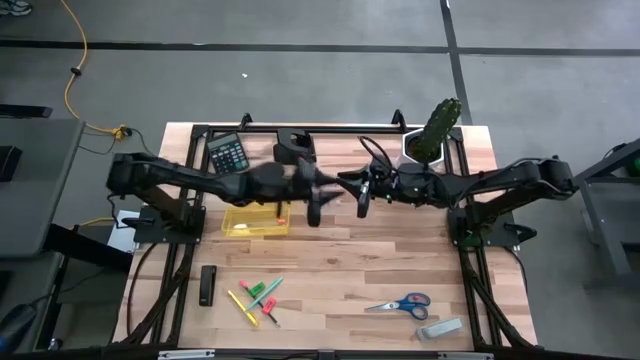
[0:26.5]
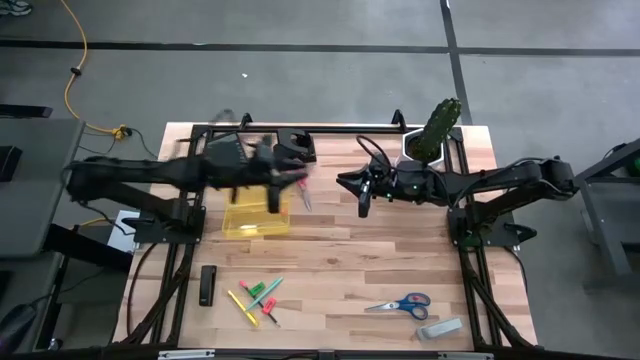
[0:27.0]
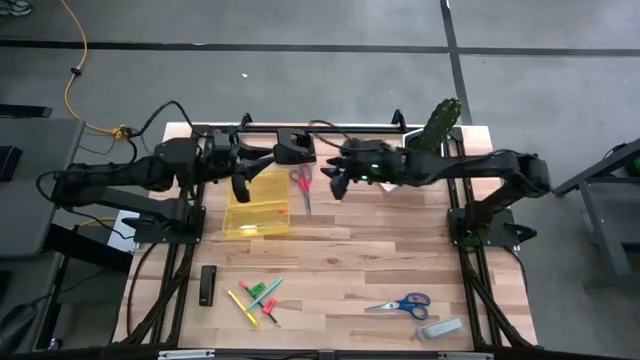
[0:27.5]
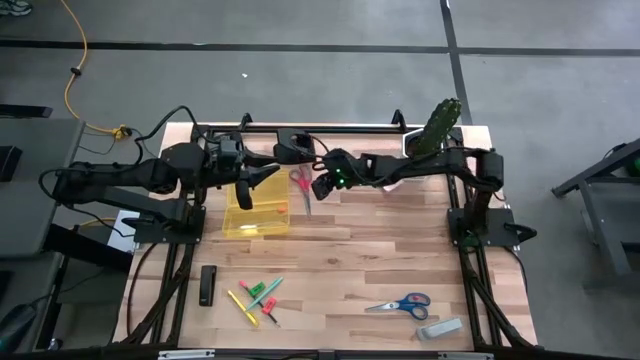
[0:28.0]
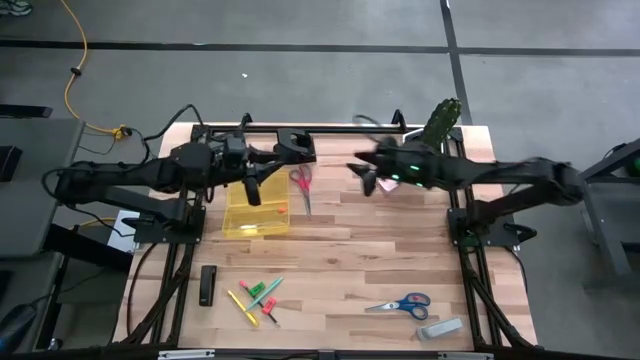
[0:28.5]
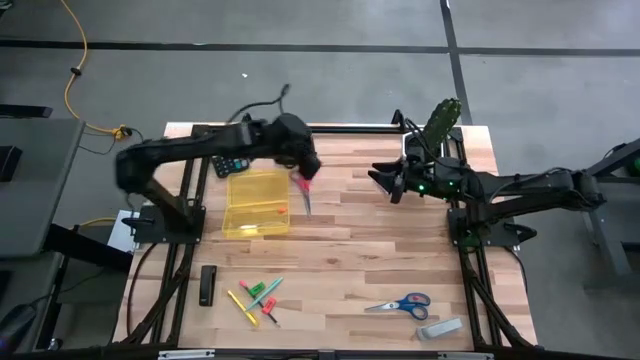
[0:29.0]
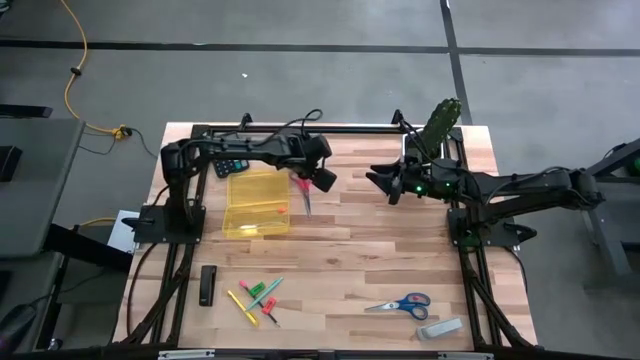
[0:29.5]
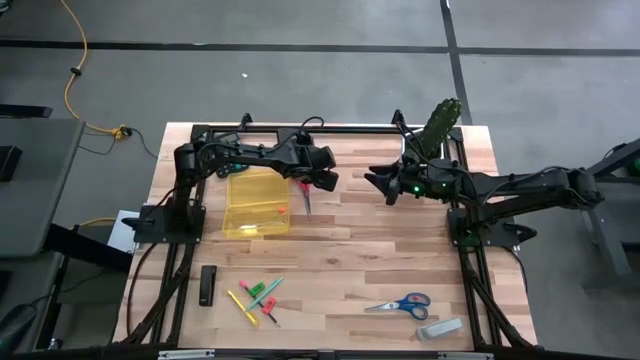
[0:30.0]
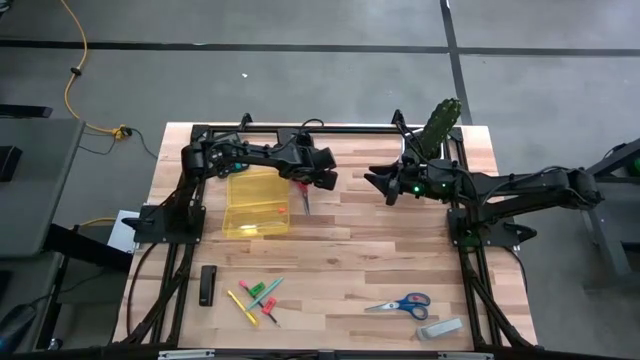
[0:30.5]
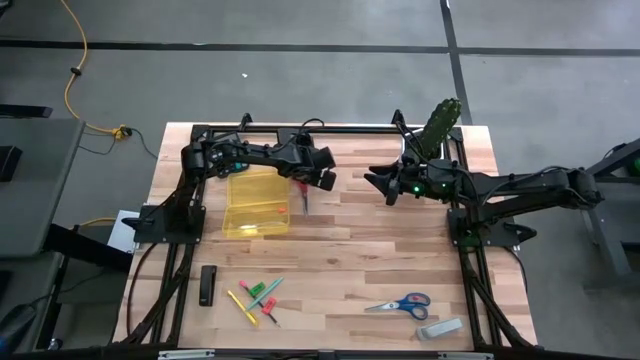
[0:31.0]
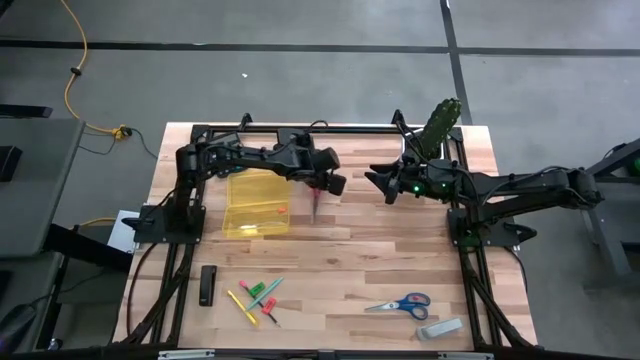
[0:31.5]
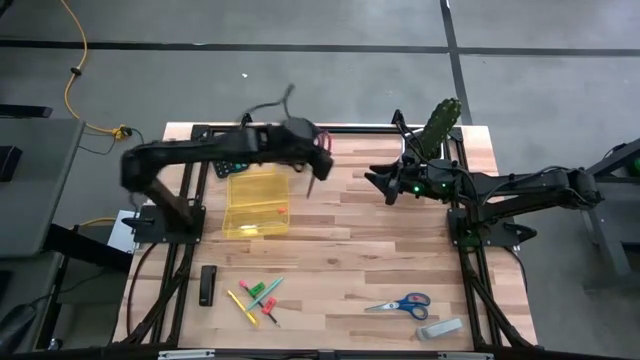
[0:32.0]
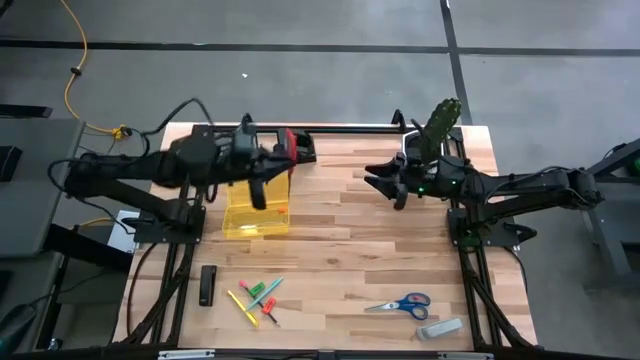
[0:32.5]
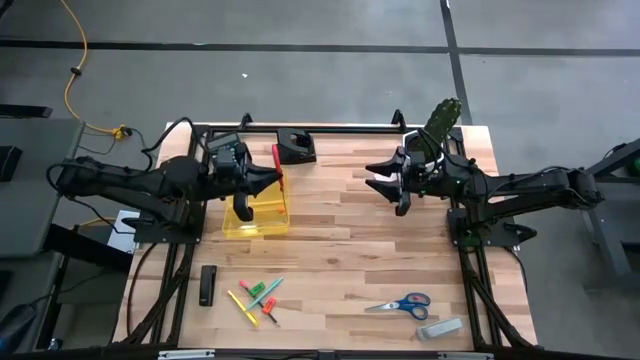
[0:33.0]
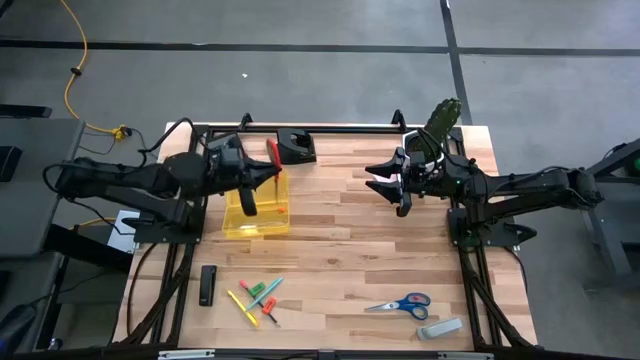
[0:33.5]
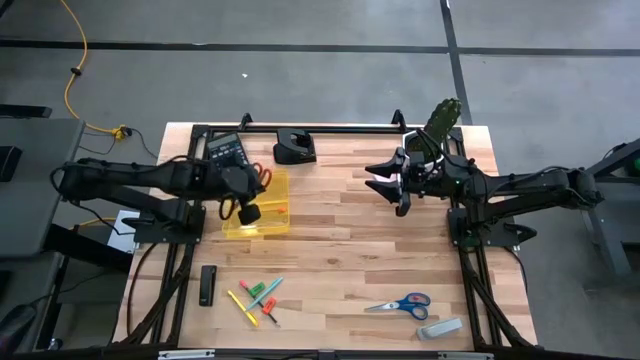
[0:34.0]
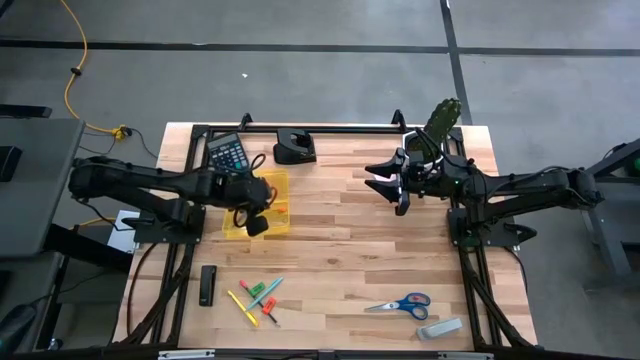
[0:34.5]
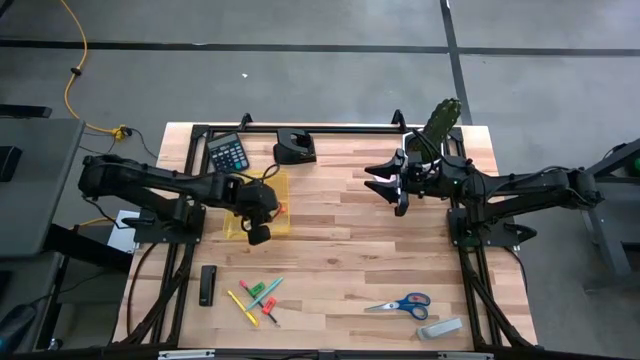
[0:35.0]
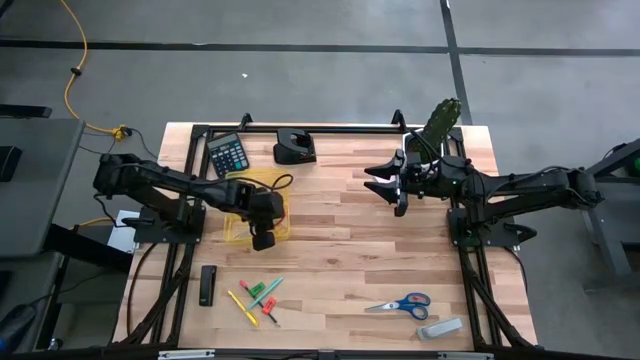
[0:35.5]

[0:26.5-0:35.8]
Task: Pack school essentials
Put the red scissors into the yellow supply box

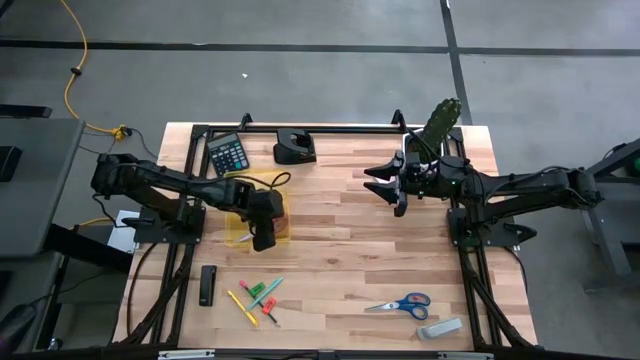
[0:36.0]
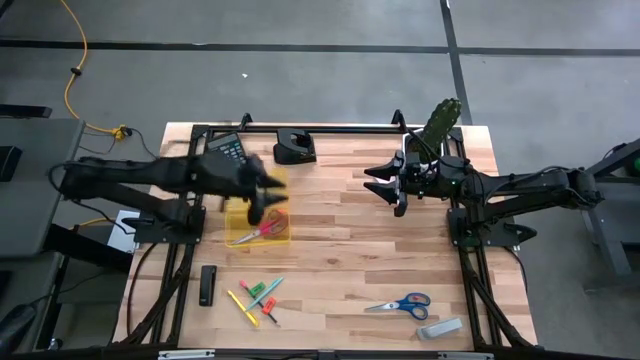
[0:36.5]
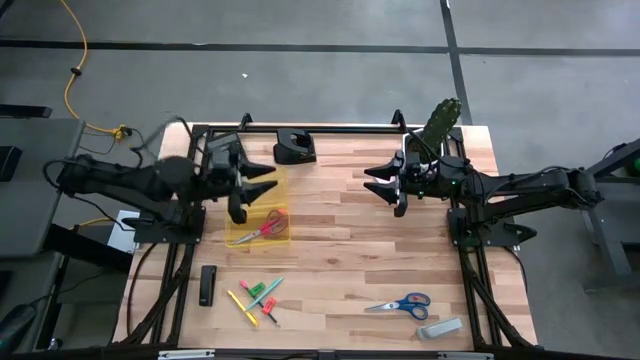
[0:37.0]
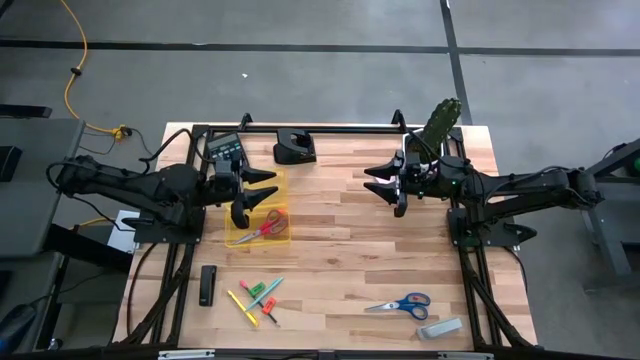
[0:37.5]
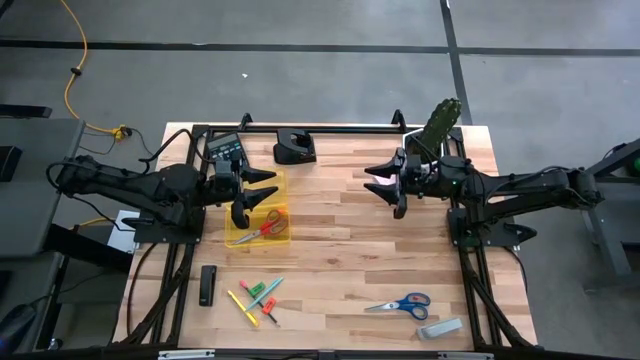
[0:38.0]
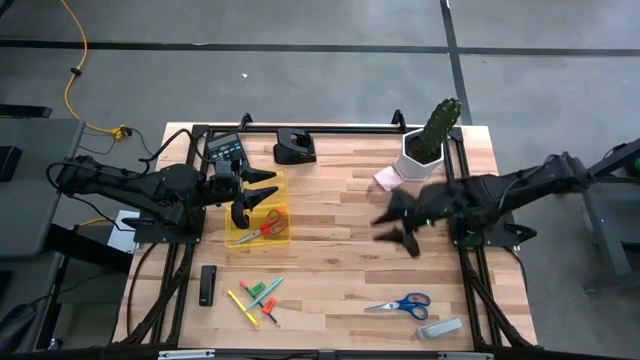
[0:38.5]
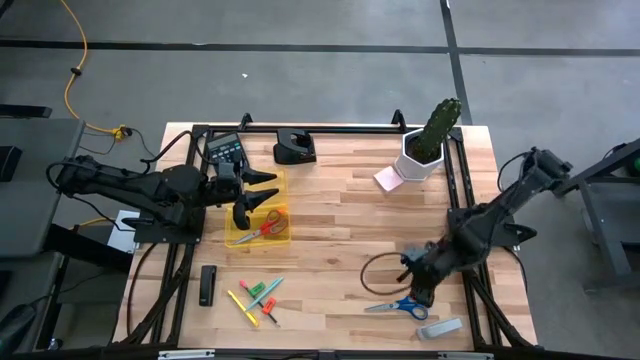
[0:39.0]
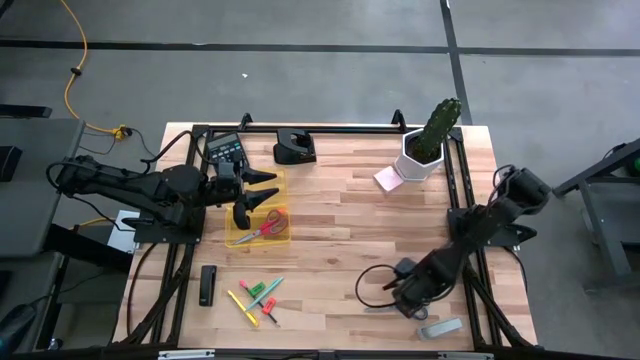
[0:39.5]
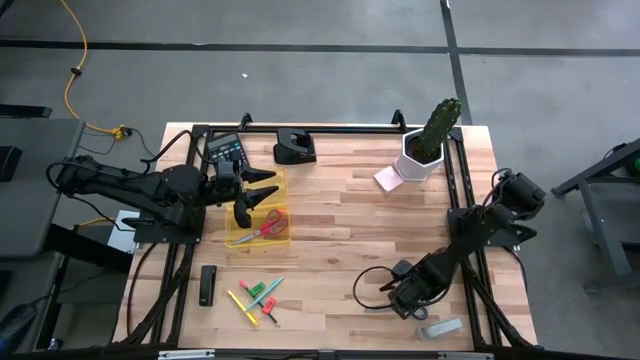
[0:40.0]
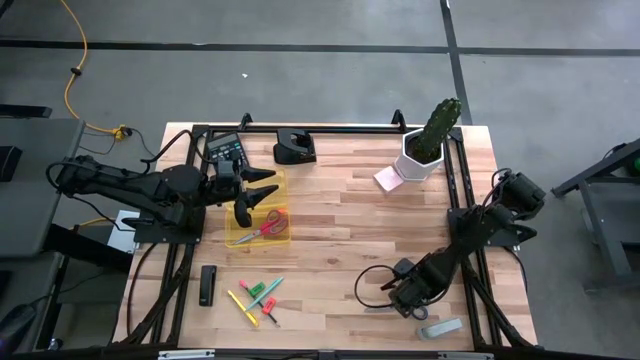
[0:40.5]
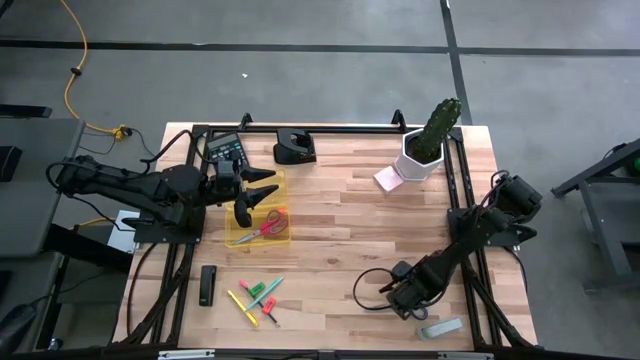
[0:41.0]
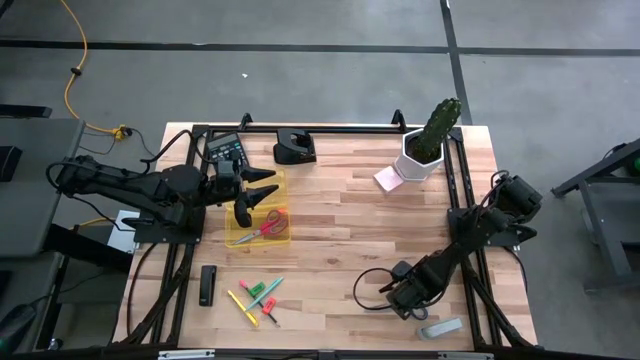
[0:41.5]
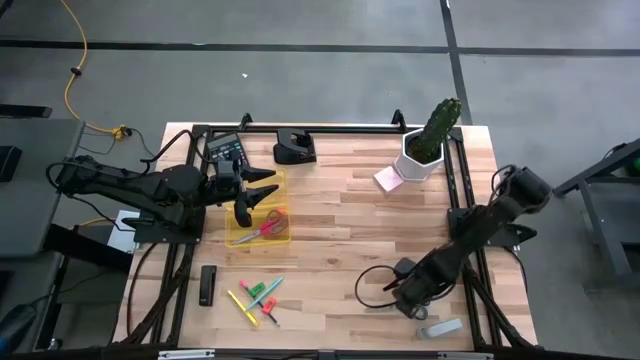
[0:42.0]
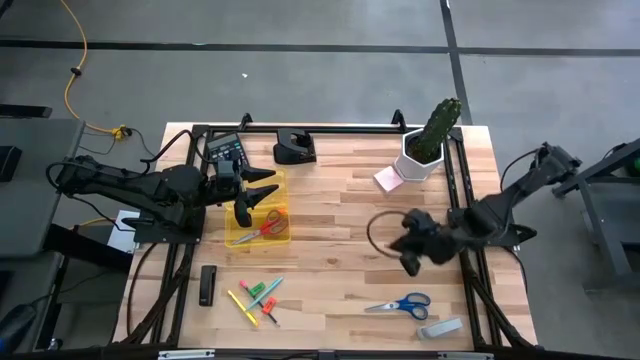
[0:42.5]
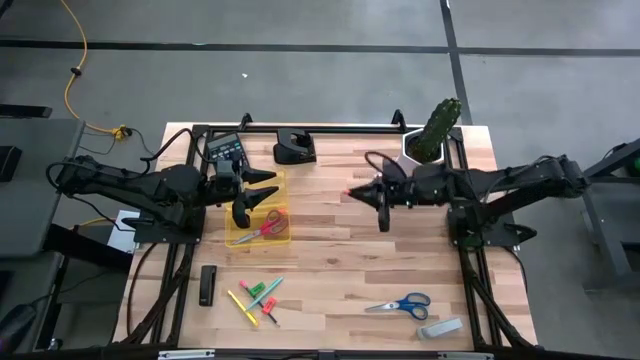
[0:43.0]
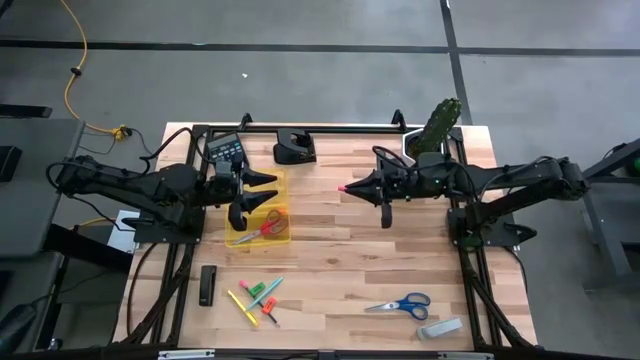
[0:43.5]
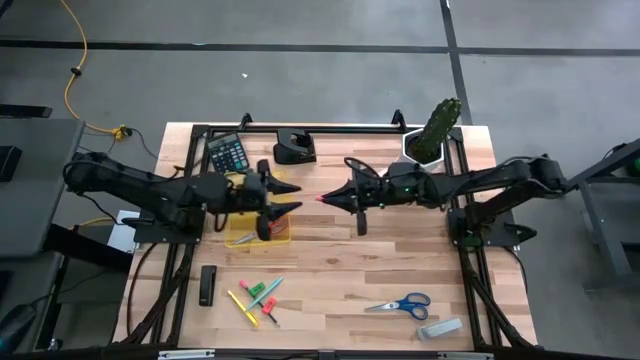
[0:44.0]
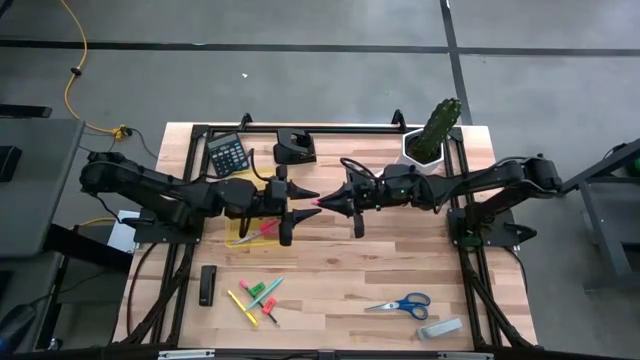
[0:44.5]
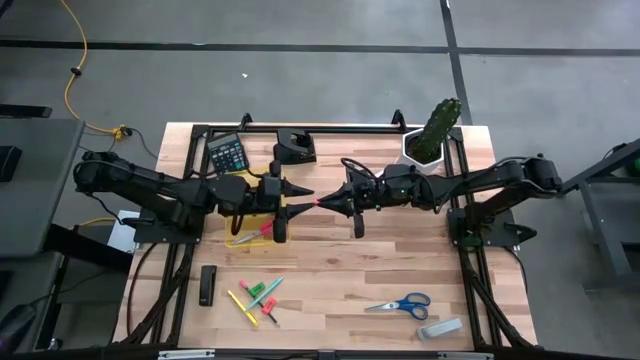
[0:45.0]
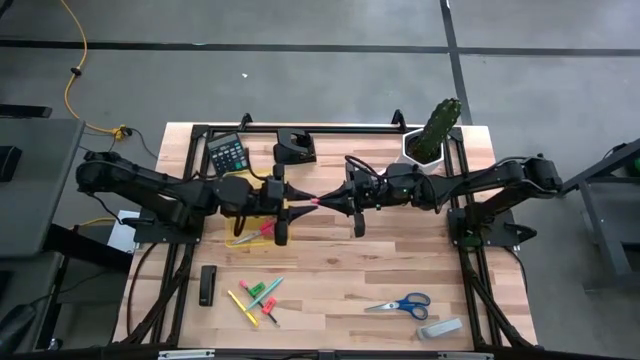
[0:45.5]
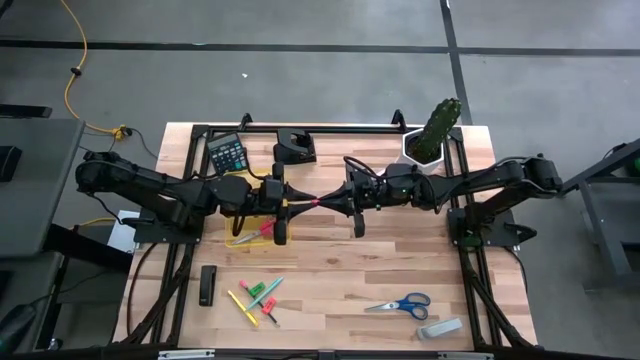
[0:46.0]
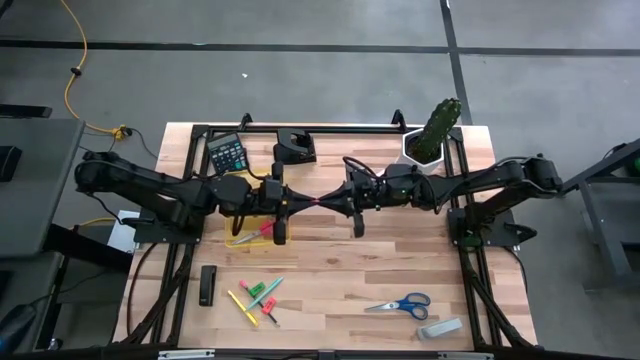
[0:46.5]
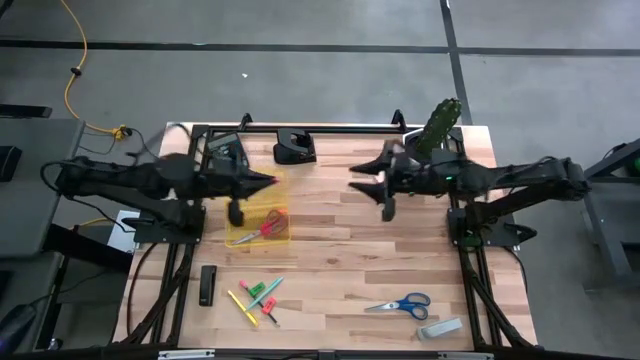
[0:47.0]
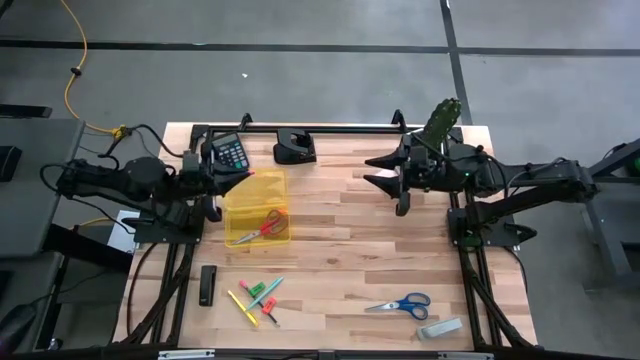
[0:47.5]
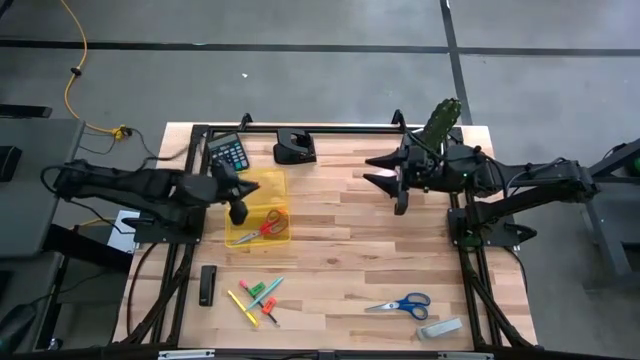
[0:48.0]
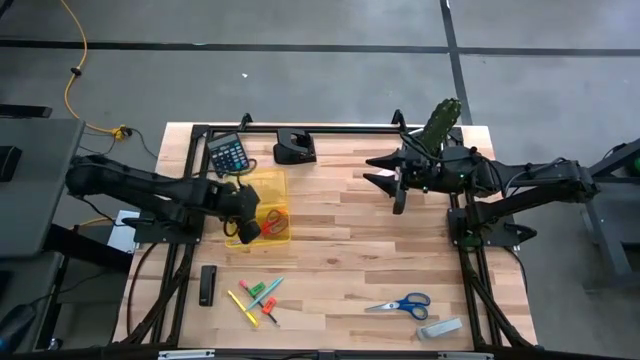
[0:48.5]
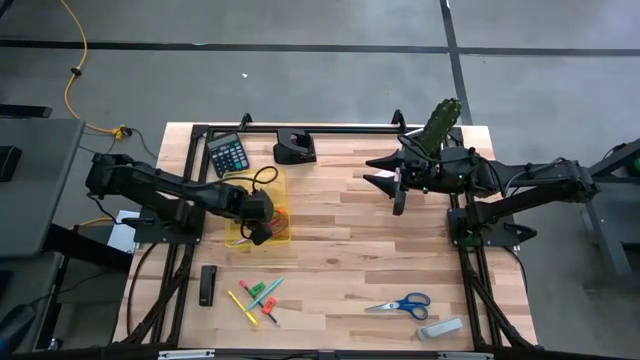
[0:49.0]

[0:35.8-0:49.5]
Put the pink pencil top eraser into the yellow supply box
